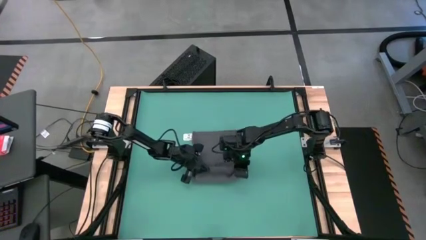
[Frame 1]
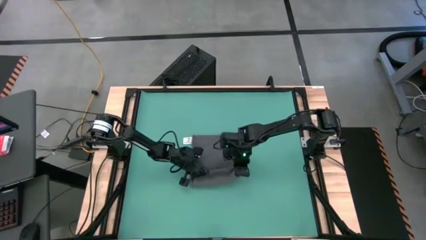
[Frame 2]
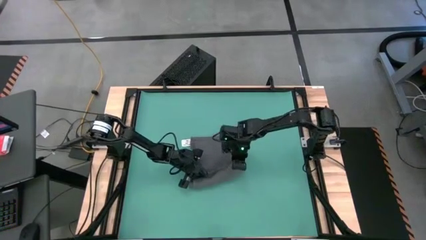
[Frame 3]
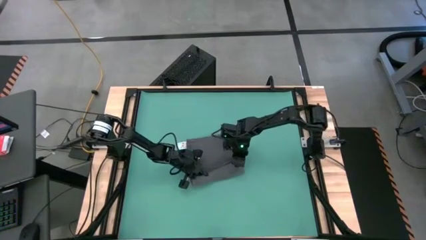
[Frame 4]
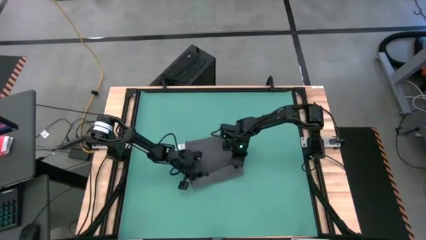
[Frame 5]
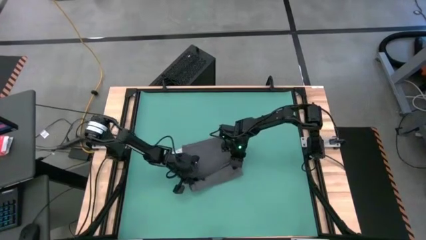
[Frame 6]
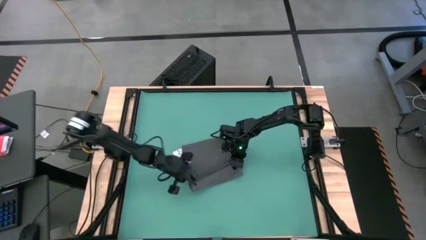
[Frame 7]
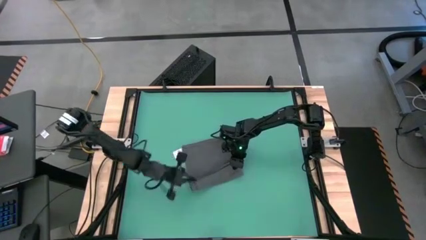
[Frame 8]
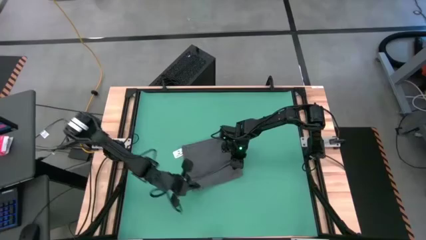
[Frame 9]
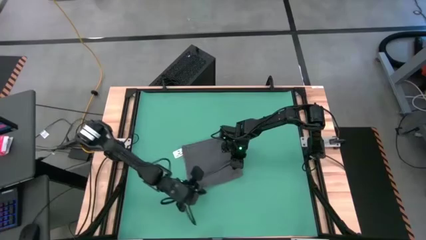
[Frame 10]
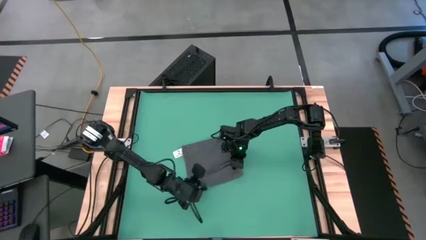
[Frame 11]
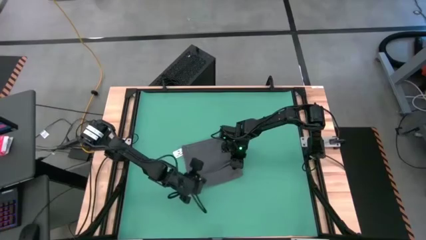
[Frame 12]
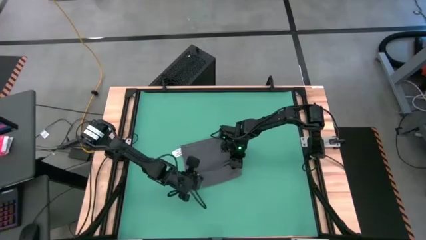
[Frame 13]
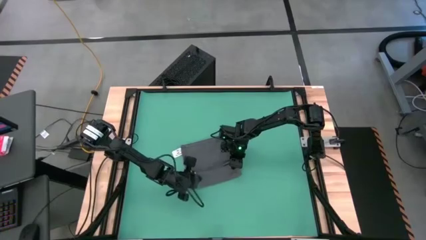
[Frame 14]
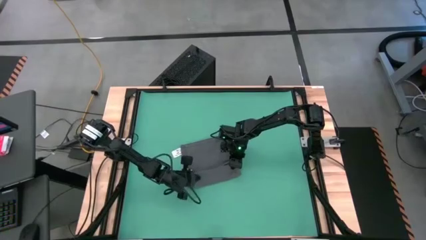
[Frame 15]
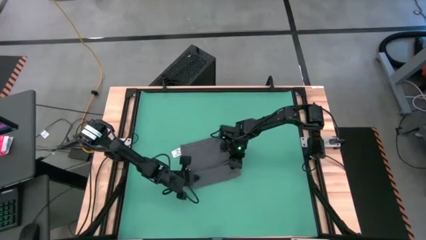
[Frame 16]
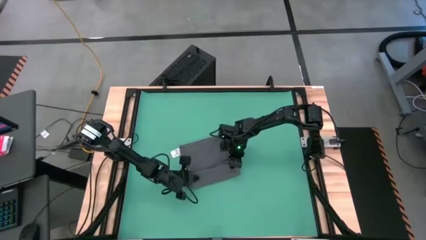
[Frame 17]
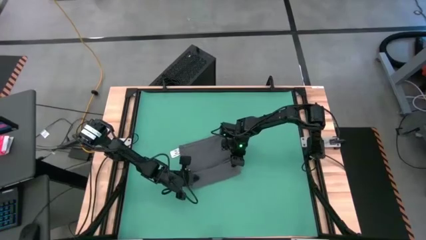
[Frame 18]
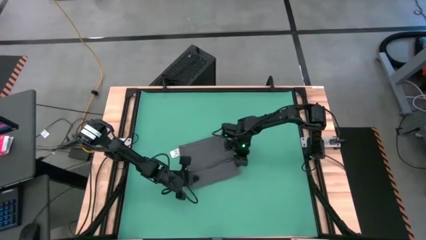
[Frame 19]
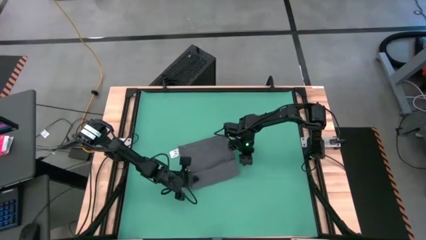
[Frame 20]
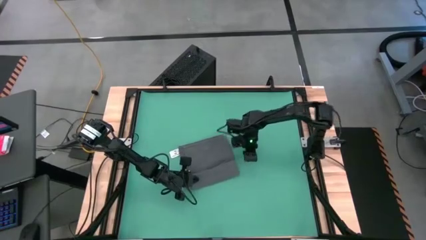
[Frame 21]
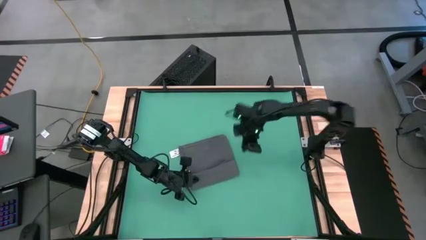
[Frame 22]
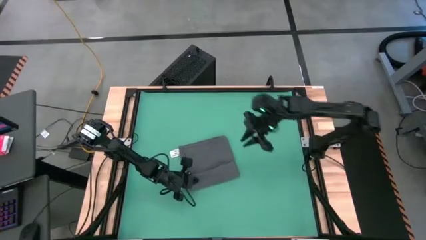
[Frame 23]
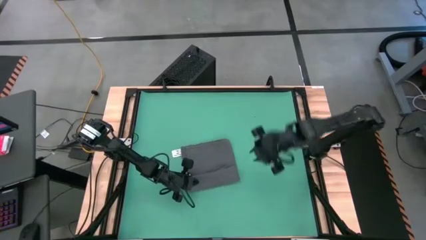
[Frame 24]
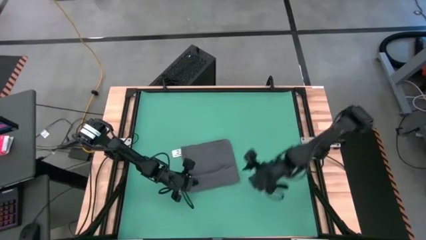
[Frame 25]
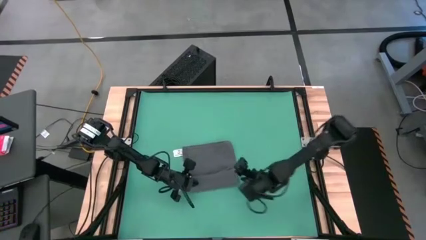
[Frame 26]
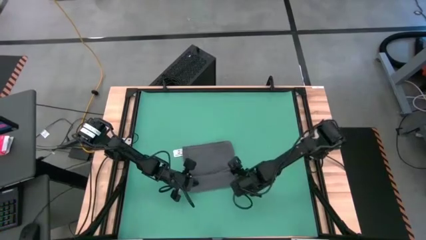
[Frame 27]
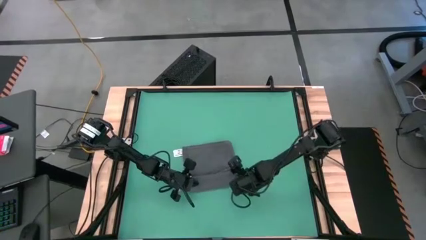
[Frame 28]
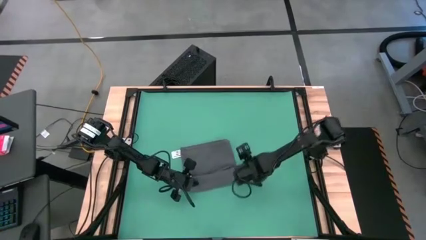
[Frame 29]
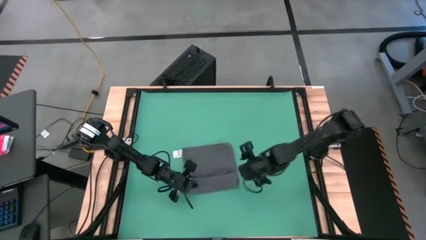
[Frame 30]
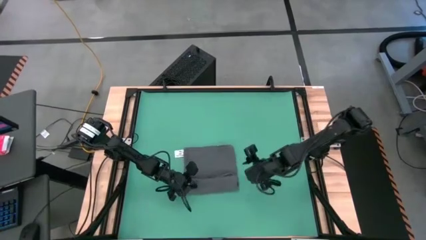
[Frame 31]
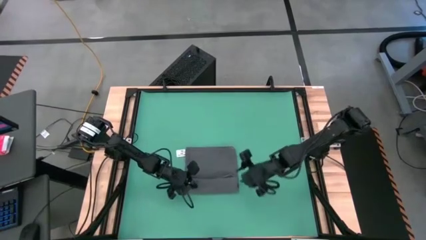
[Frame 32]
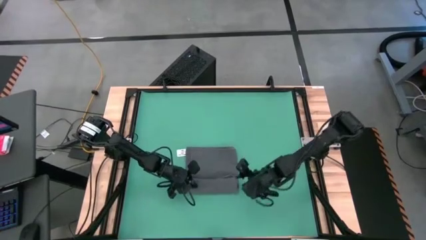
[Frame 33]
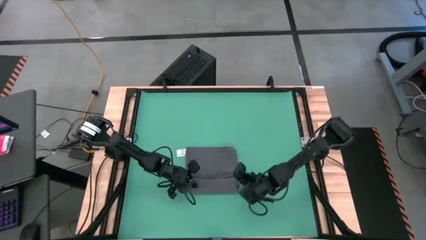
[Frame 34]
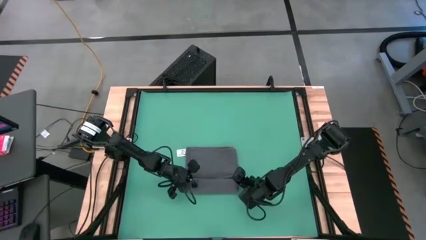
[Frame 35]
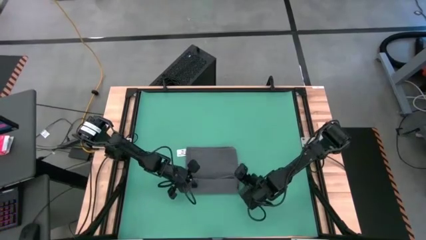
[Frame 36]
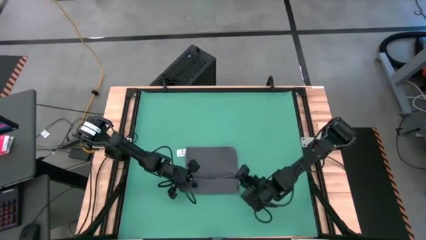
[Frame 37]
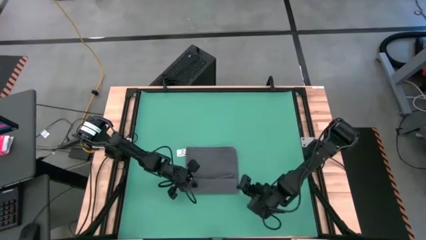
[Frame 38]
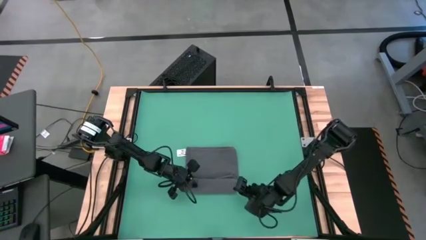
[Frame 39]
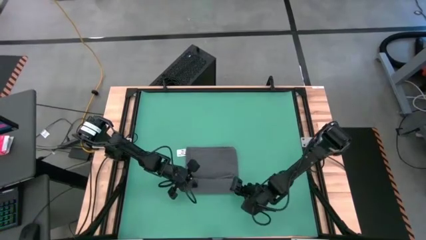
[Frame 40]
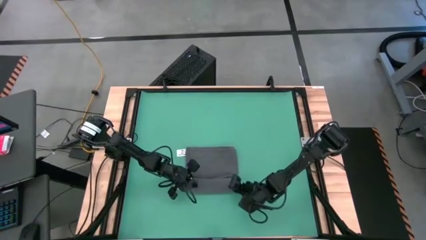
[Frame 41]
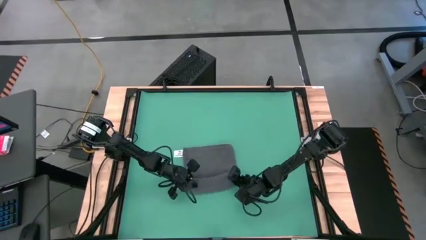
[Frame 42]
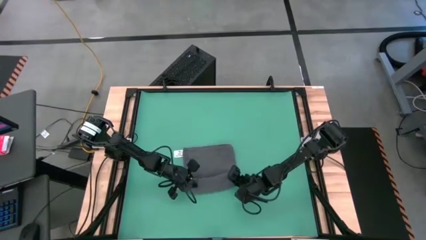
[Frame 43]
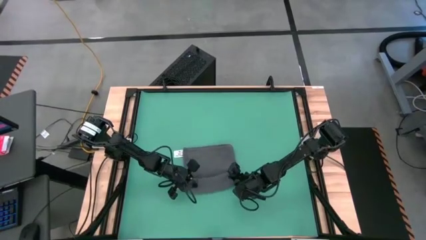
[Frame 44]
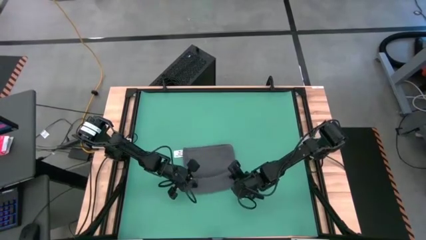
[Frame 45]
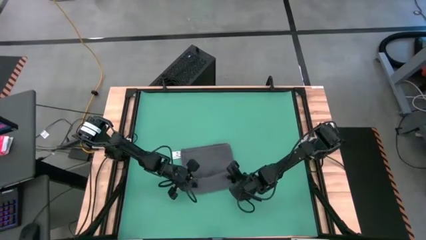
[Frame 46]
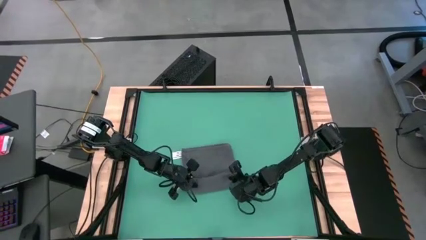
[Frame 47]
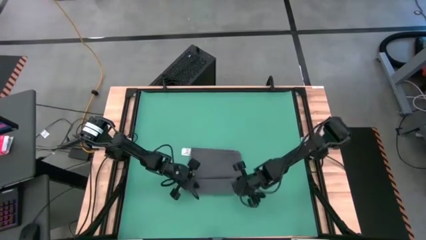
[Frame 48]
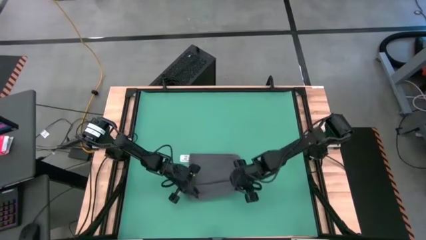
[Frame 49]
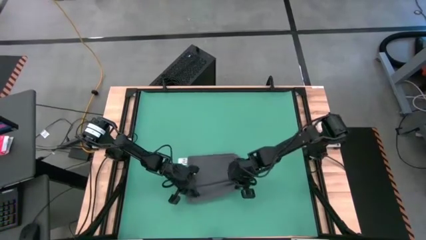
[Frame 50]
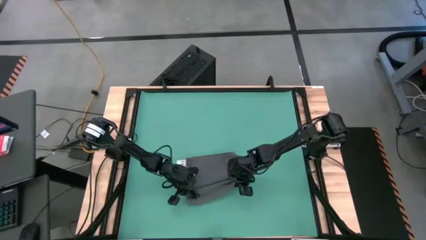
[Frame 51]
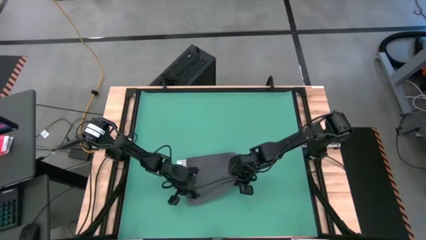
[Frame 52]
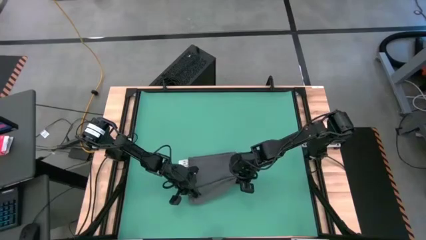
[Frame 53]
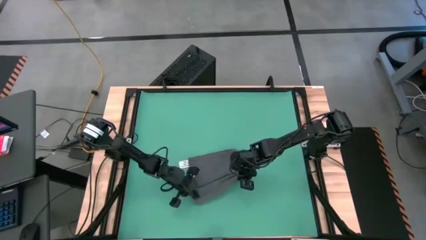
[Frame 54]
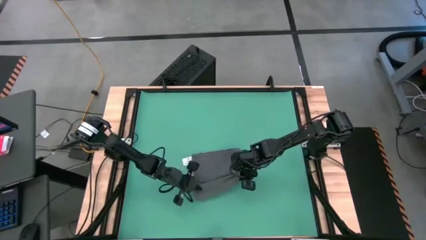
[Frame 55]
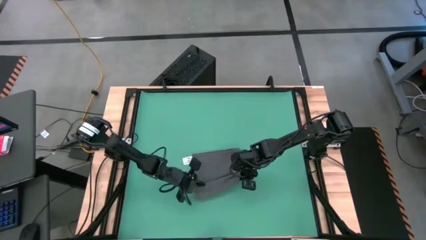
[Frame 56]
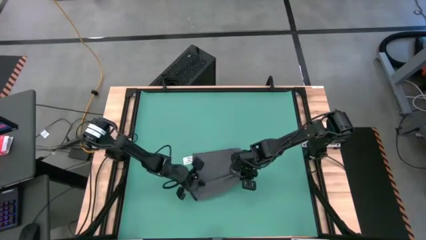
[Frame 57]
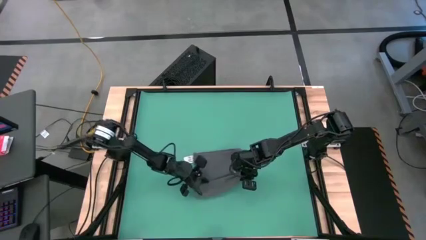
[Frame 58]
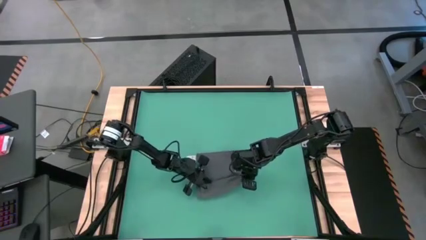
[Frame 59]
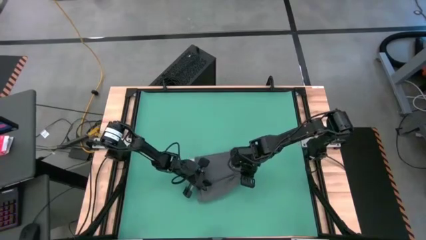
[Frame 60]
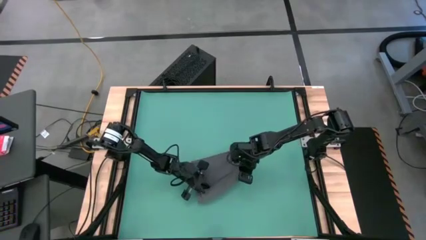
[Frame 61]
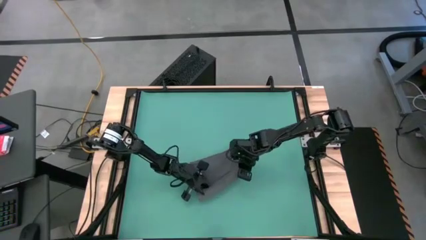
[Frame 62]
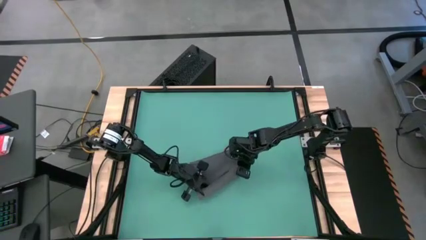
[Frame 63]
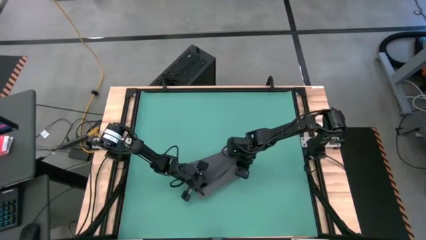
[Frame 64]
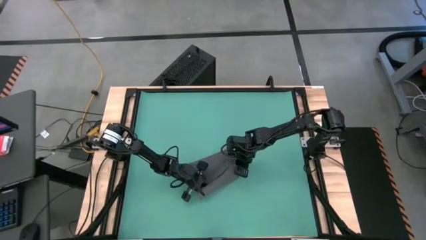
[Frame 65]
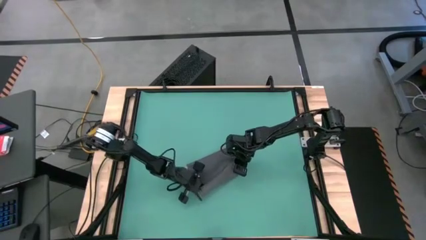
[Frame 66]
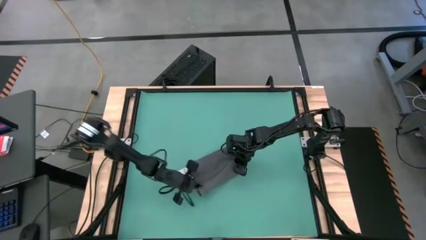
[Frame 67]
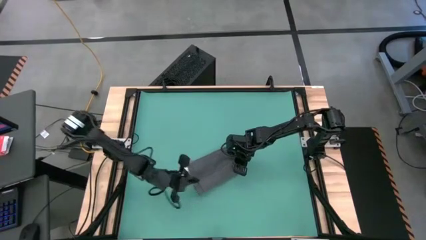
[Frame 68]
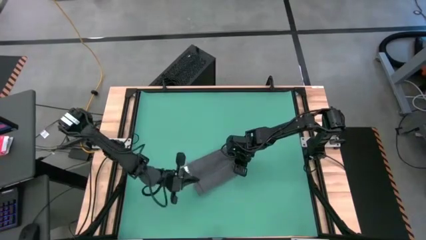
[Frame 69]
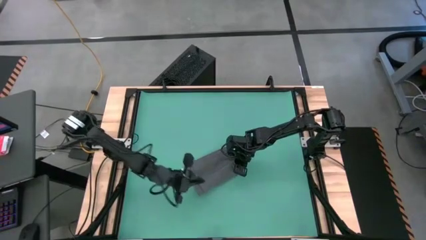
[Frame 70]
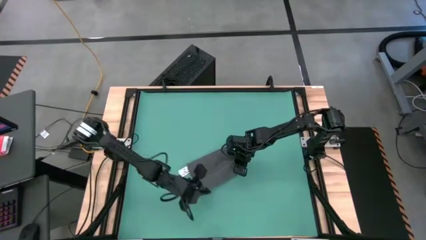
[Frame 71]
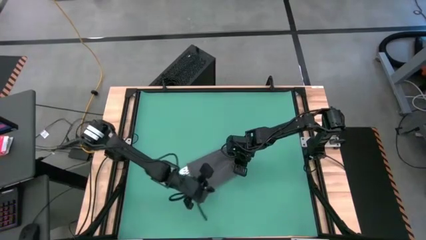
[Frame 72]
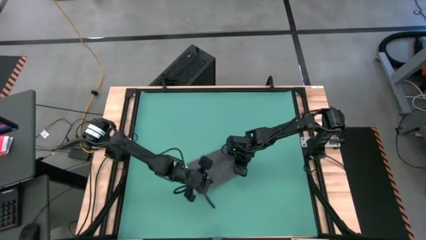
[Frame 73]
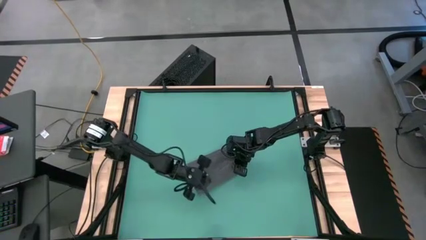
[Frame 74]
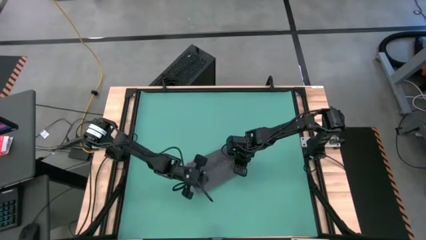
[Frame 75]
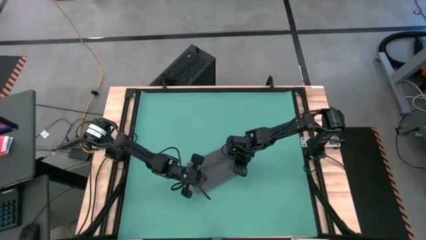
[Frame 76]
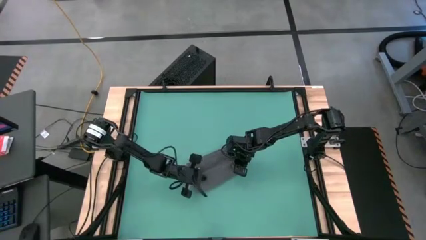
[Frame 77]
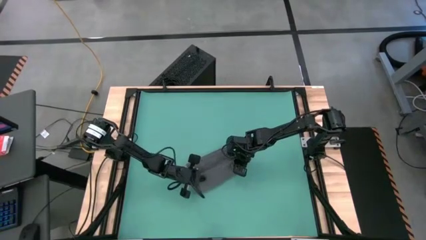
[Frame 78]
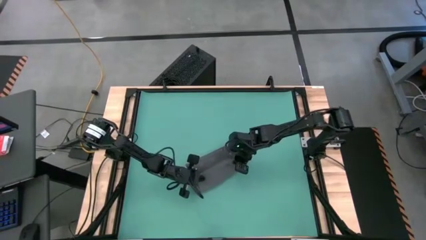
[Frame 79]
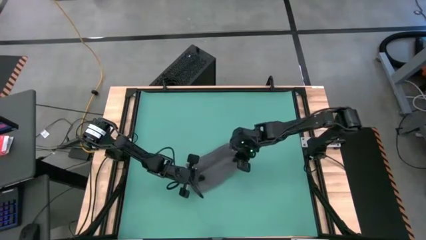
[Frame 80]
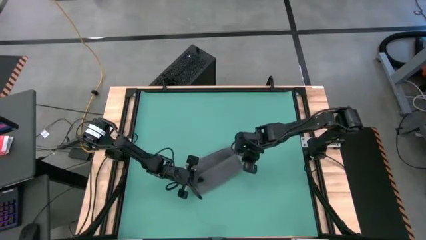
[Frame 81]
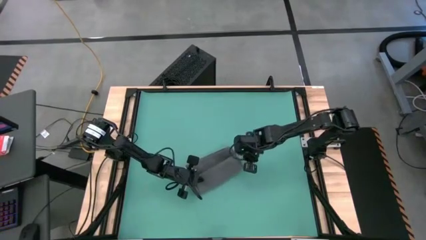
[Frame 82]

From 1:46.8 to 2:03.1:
Task: Roll towel
Roll the gray towel
